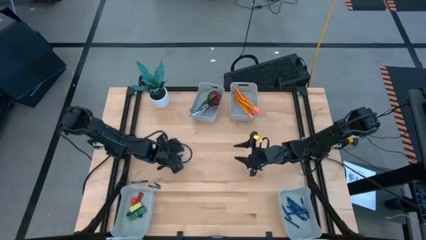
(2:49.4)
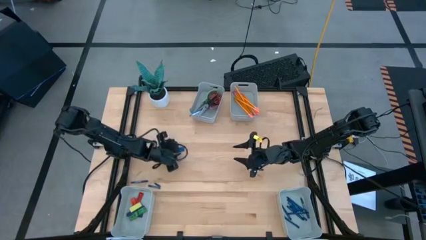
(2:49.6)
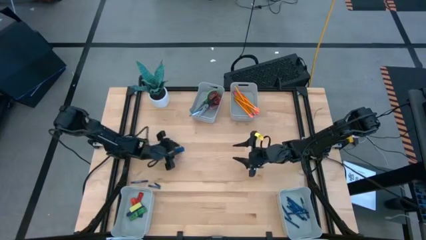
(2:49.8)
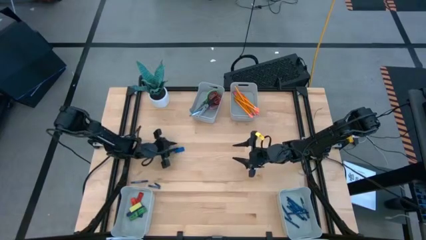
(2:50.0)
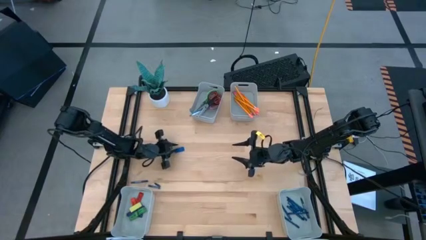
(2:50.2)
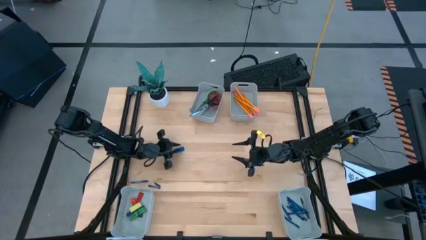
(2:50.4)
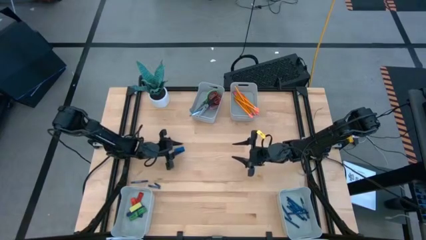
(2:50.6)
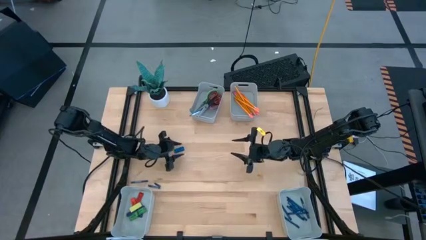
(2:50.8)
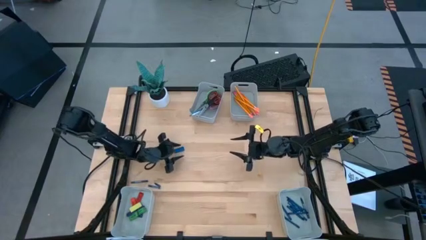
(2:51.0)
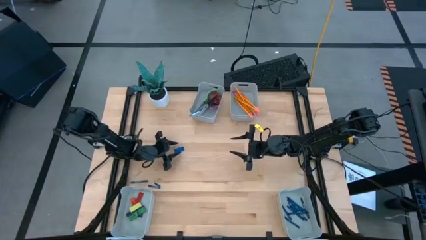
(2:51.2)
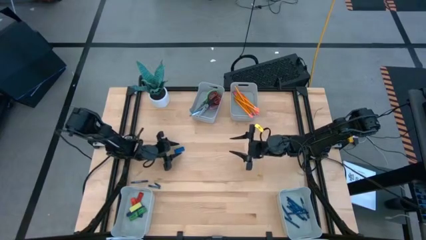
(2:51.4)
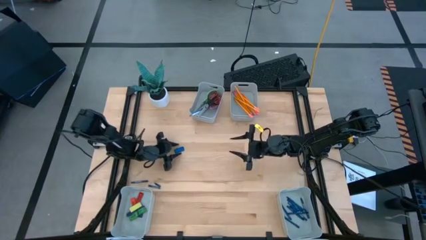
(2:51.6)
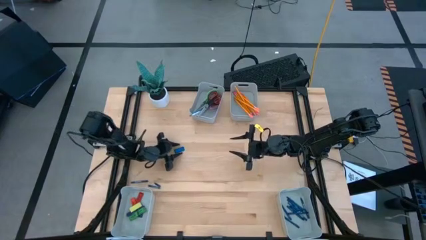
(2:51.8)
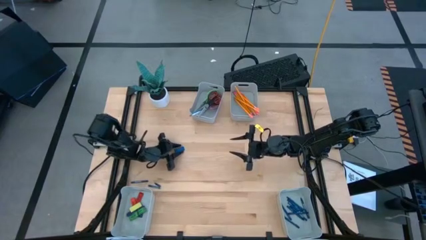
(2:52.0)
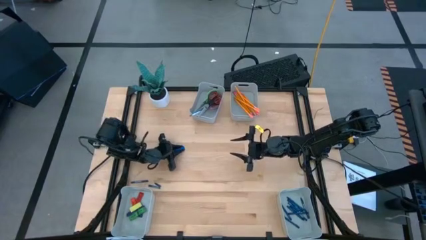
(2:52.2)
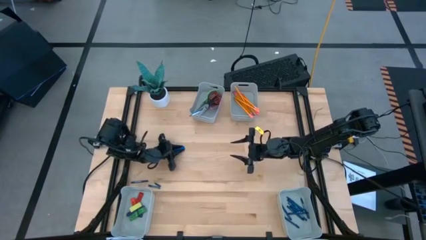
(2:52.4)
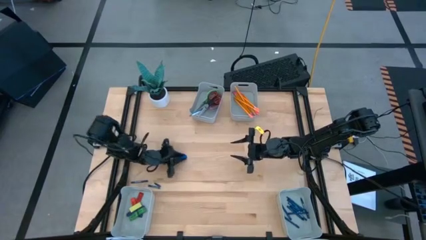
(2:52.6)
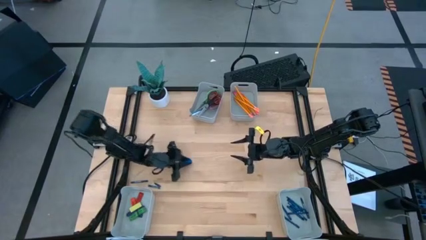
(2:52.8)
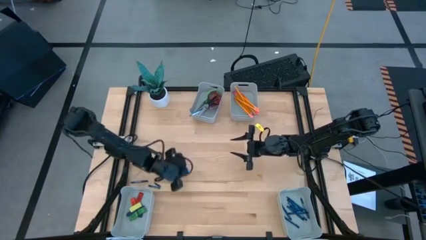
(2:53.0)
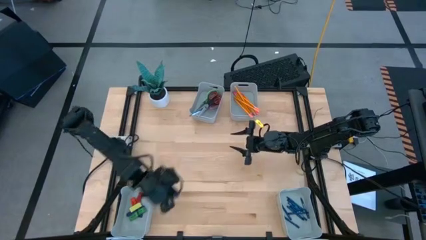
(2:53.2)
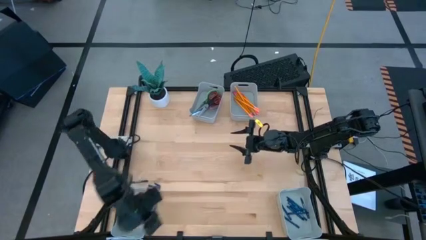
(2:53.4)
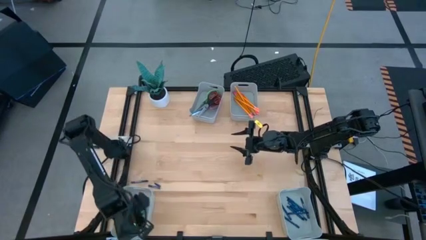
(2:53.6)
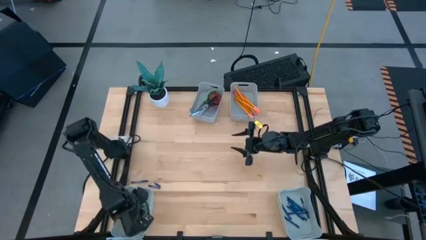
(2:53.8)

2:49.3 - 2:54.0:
Task: Sort crayons/erasers/pens/pencils in bins
Put the blue eraser into the bottom left bin

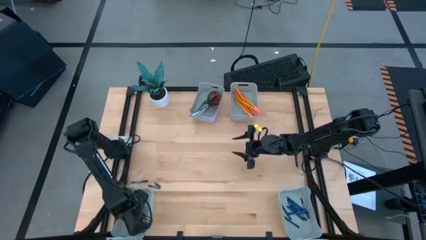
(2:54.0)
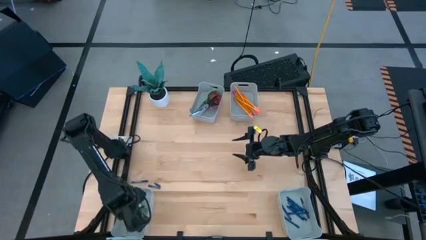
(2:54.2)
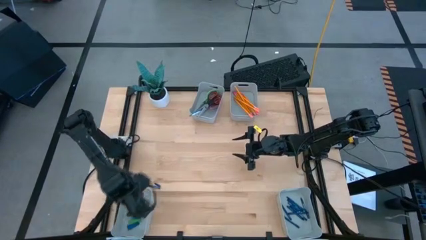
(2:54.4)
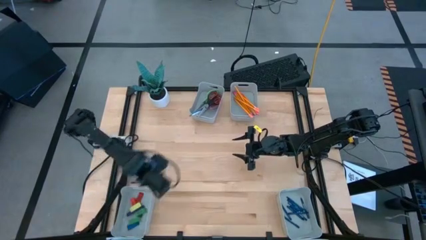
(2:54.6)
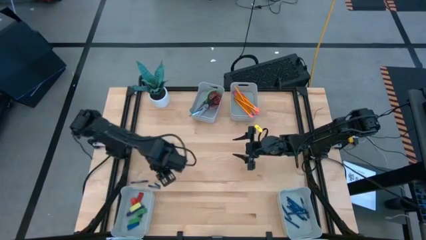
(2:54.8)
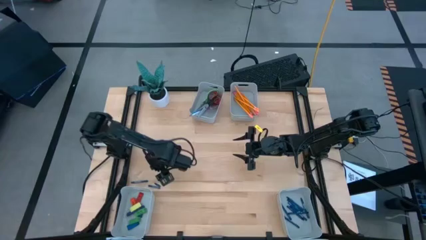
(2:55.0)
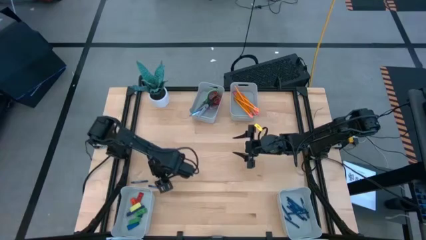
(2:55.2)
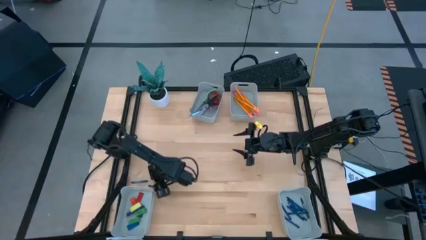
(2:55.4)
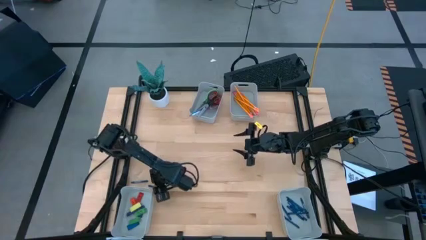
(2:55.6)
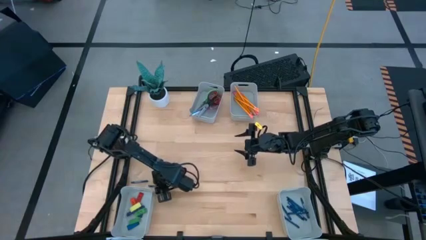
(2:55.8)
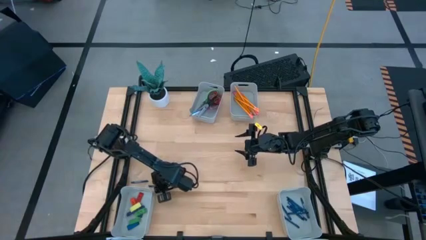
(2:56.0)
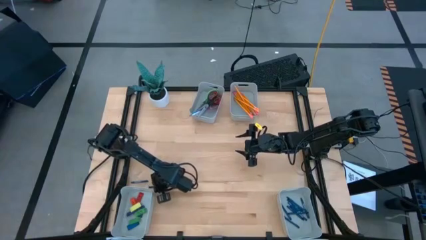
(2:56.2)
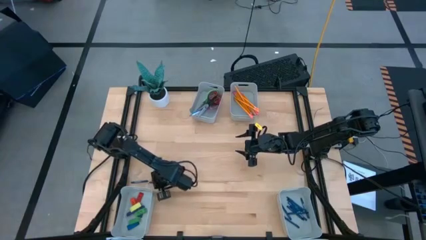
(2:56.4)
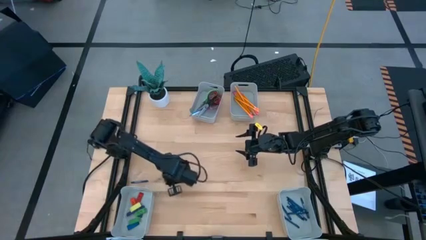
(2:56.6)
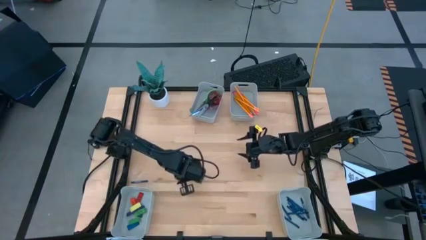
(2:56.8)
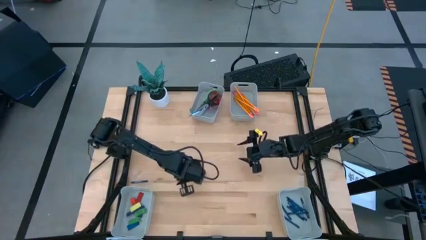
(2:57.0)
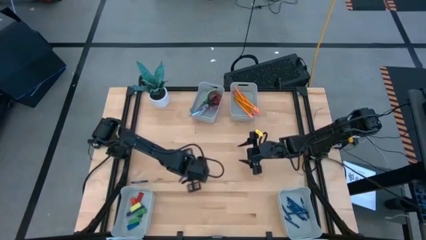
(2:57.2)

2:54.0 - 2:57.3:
Put the blue crayon into the bottom right bin

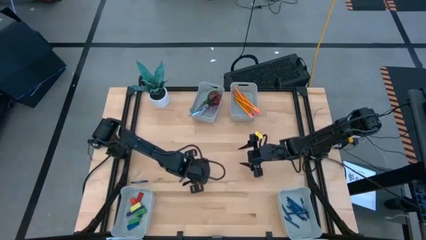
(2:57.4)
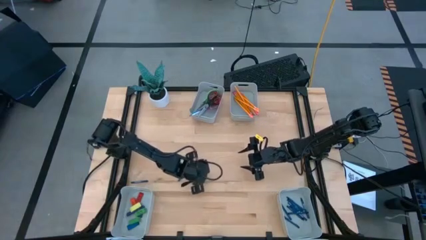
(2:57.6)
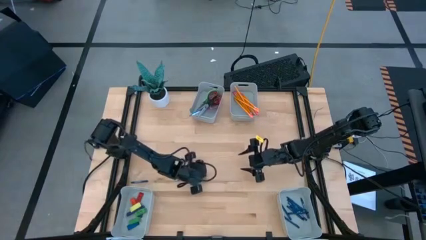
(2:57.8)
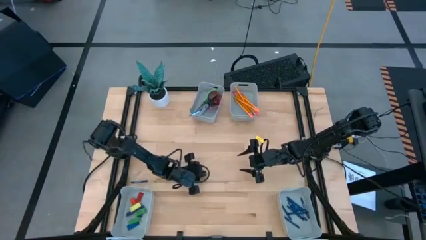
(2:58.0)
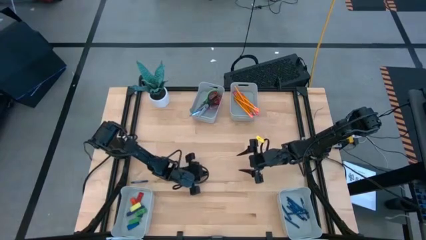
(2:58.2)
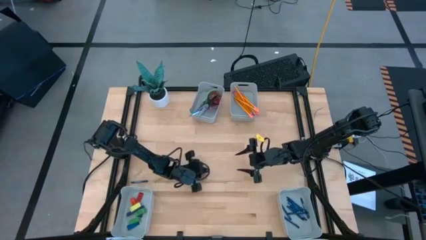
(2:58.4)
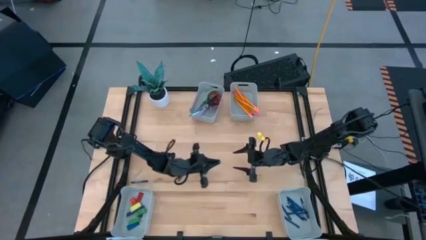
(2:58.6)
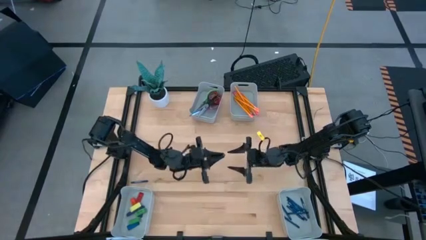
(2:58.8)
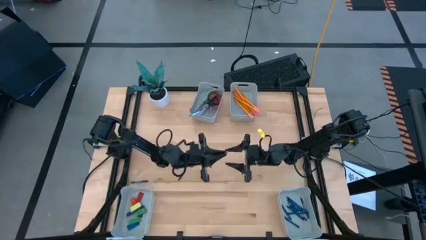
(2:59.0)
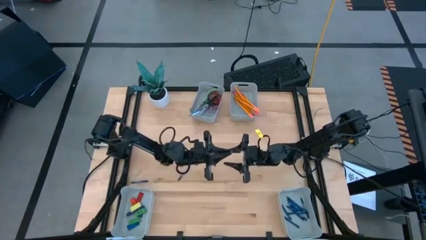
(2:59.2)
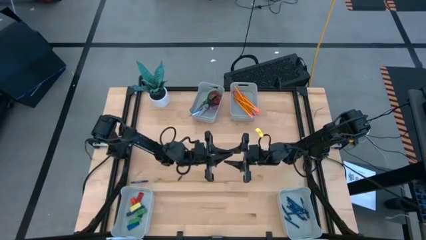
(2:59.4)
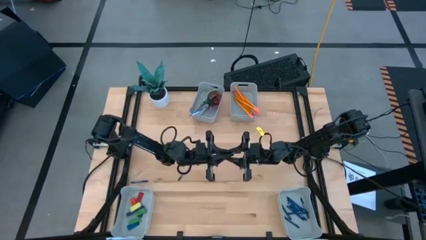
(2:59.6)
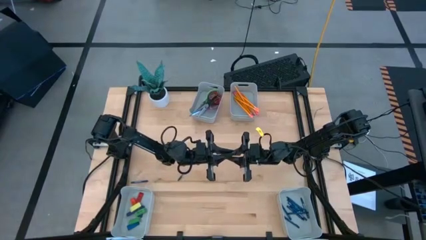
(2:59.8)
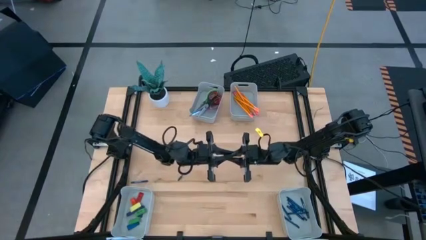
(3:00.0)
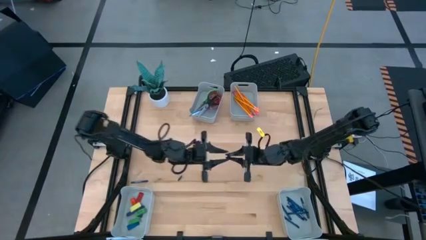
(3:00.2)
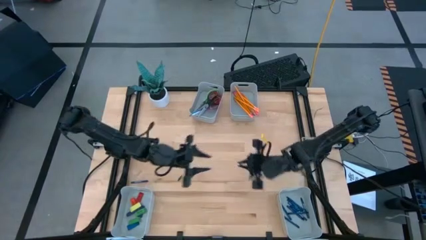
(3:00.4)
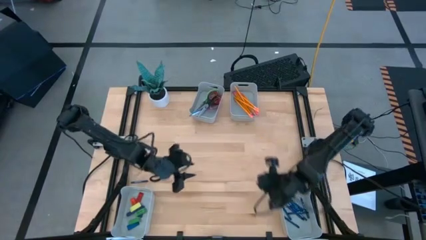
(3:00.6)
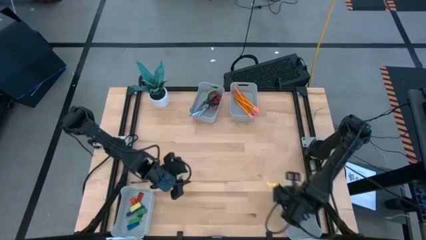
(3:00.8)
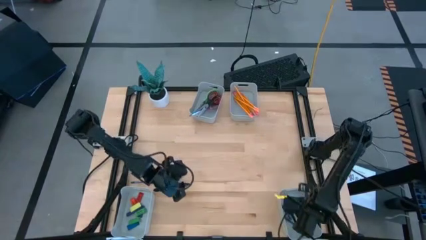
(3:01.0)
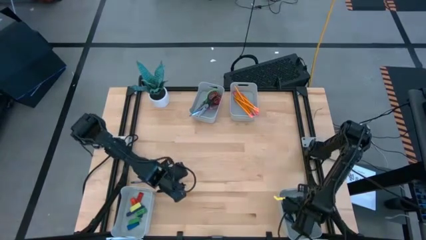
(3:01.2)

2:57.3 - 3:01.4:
Put the blue crayon into the bottom right bin

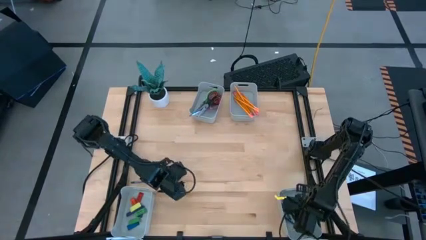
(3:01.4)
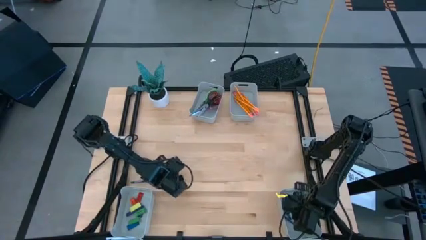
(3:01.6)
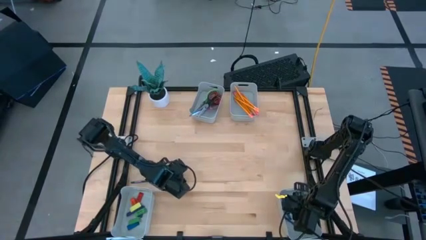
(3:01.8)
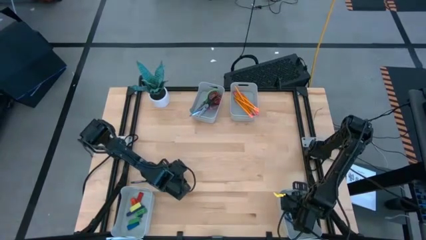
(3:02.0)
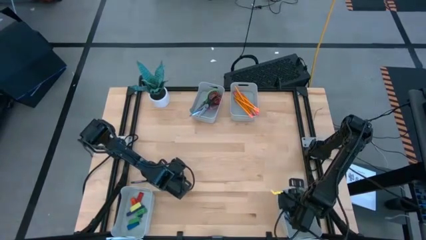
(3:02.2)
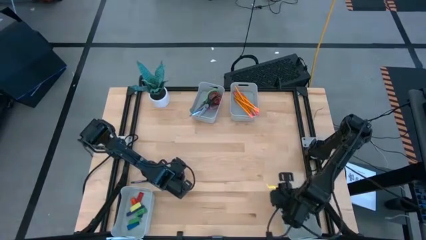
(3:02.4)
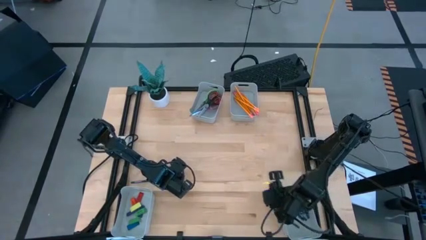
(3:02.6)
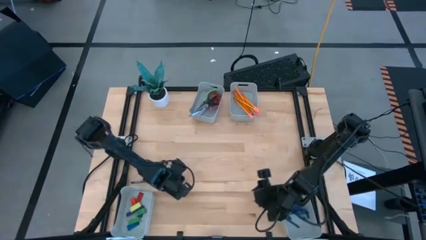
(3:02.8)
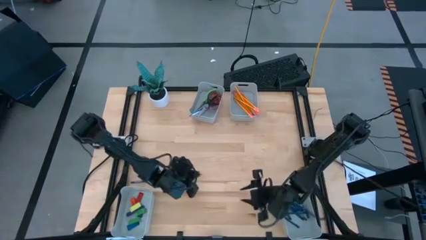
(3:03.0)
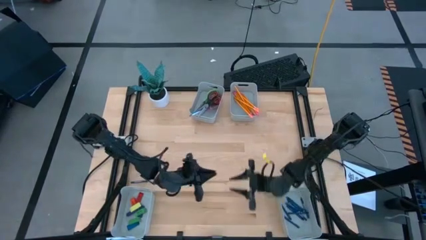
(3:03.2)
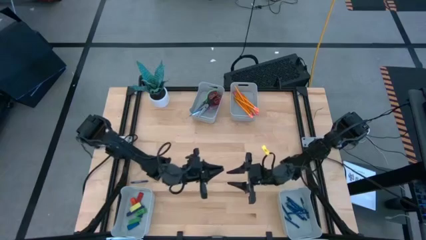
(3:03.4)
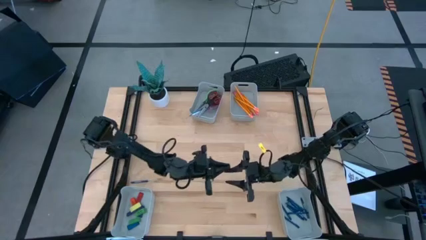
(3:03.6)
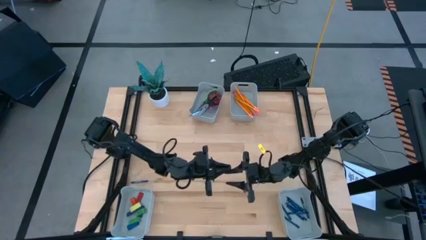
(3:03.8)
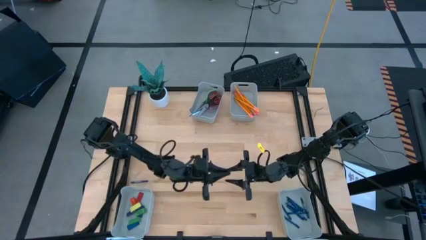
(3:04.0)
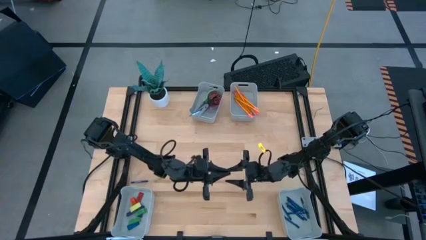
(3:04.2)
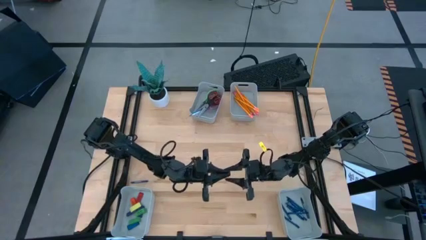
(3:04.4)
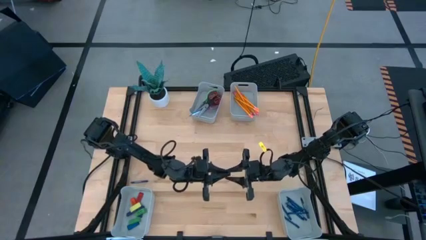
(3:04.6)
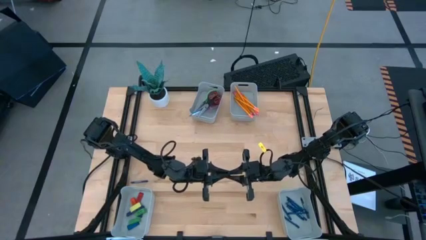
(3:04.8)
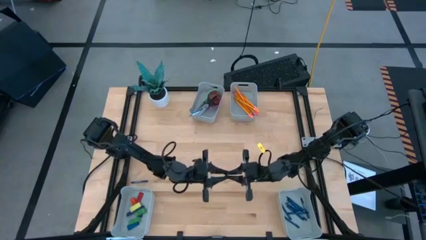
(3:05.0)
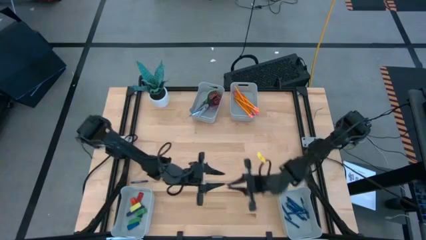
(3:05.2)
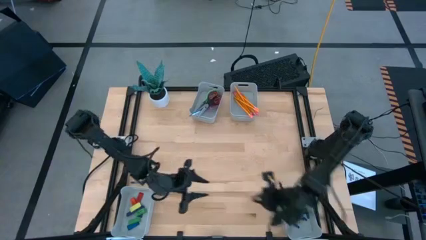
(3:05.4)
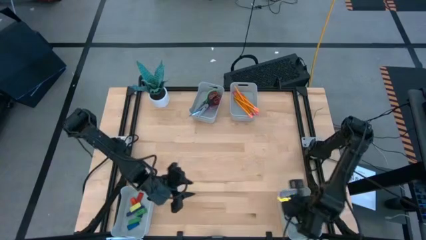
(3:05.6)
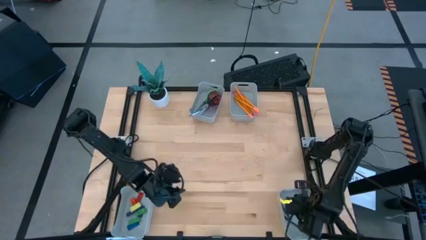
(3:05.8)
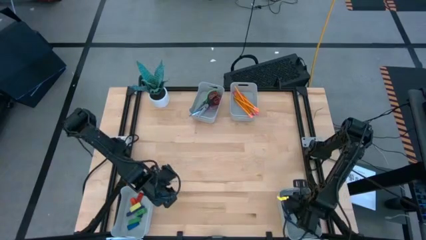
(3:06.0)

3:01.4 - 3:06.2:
Put the blue crayon into the bottom right bin
